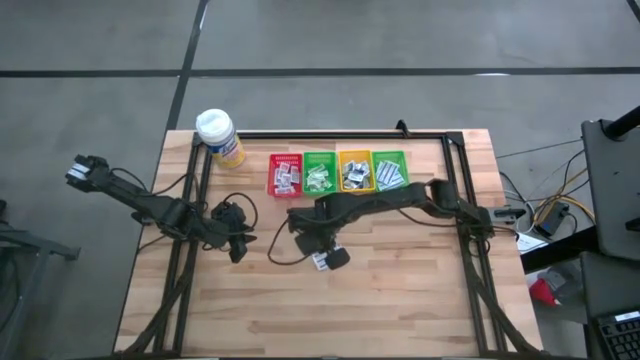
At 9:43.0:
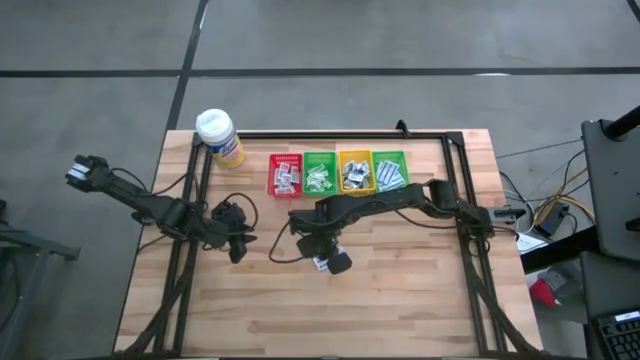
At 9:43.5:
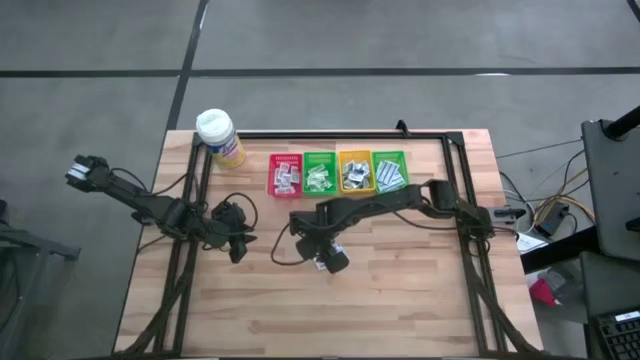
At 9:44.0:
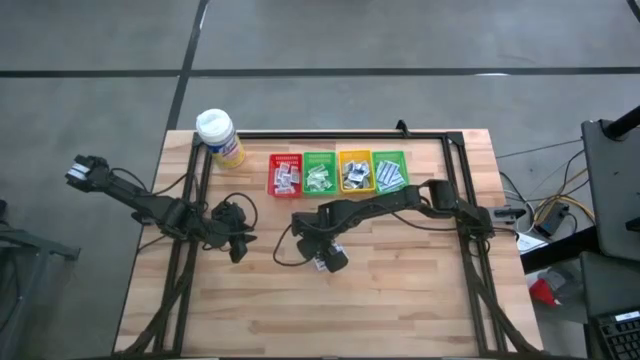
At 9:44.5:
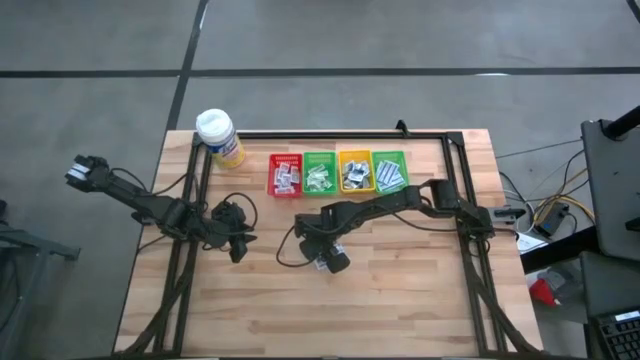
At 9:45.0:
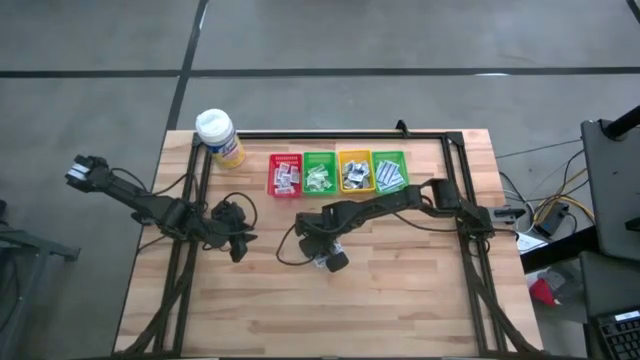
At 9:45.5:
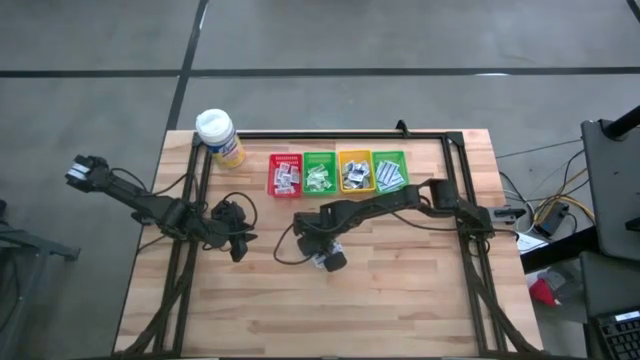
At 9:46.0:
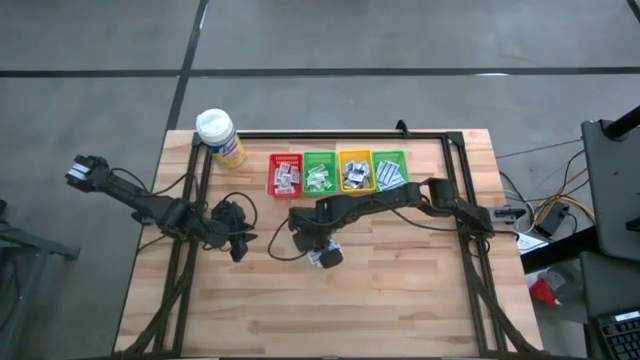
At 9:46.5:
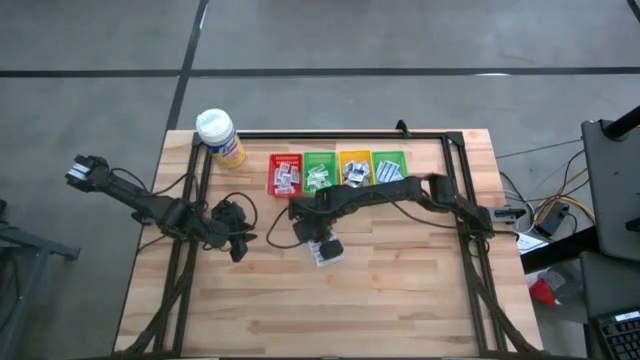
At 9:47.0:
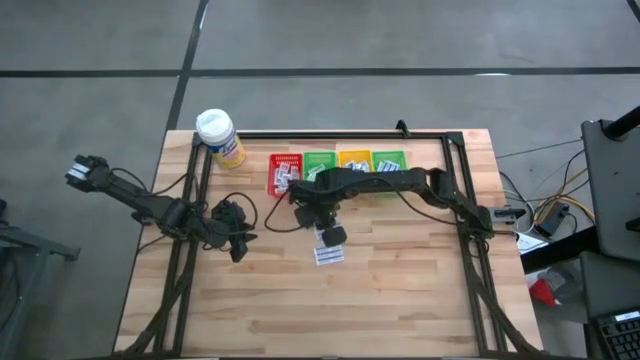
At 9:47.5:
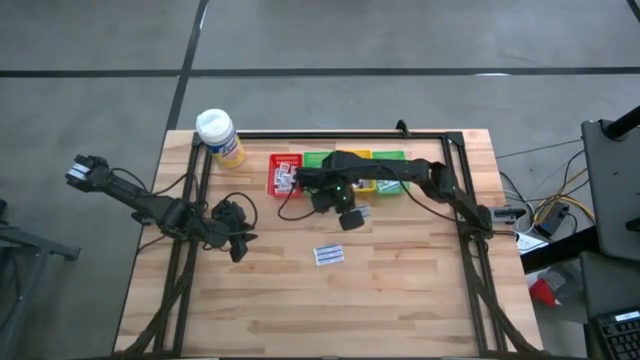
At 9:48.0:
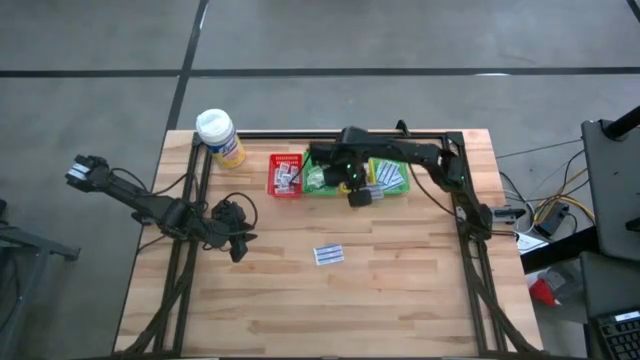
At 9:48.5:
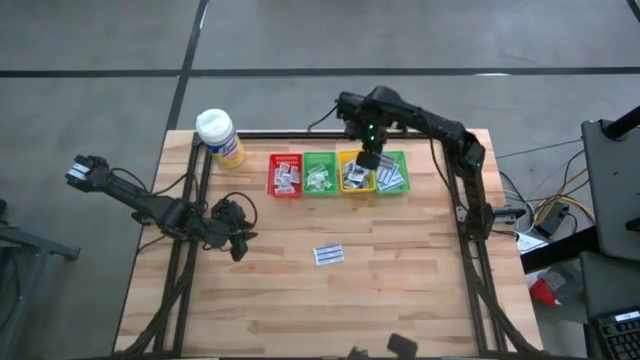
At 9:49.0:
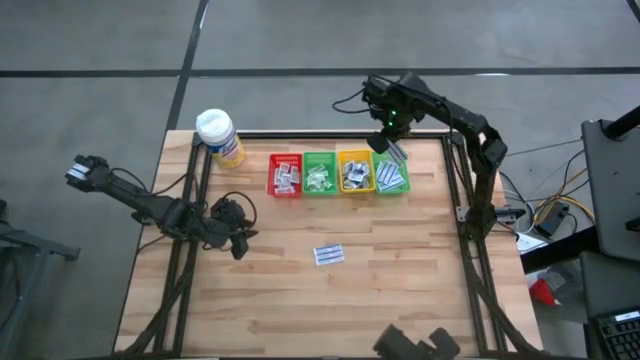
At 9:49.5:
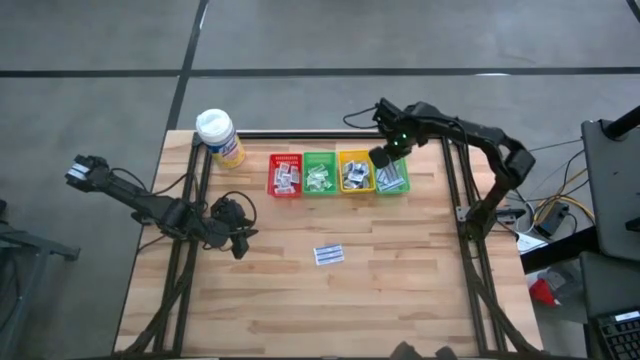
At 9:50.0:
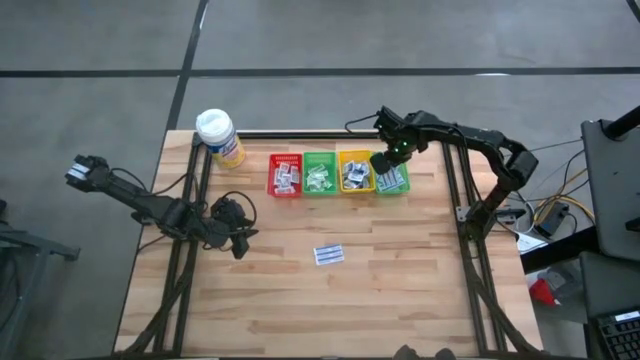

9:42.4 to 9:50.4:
Task: Pick & Place First Aid Supplies
Put the blue fingertip bandage into the right green bin

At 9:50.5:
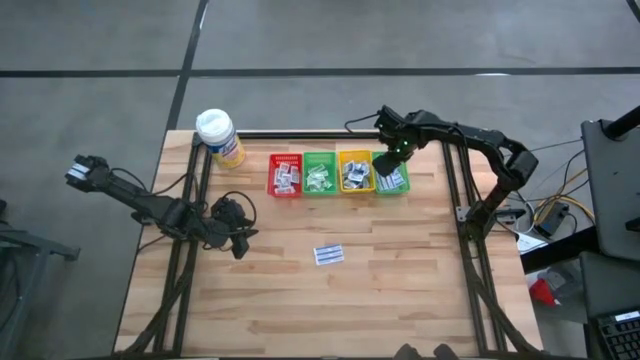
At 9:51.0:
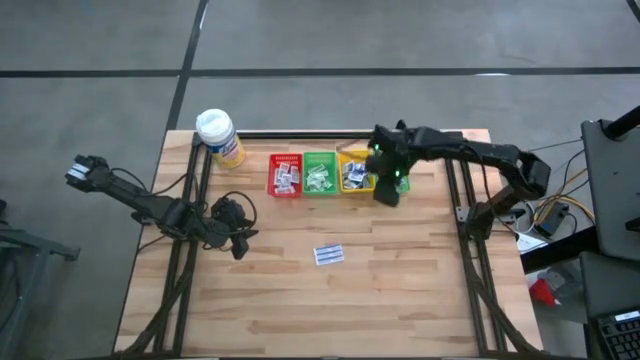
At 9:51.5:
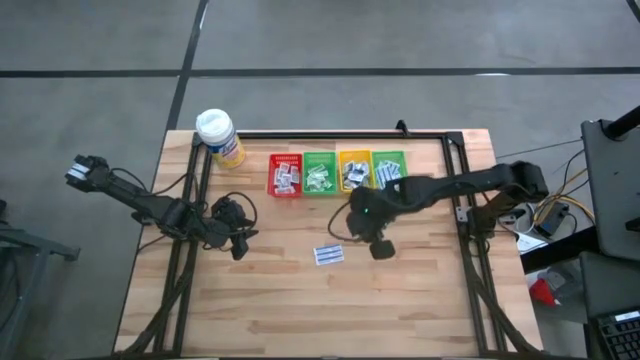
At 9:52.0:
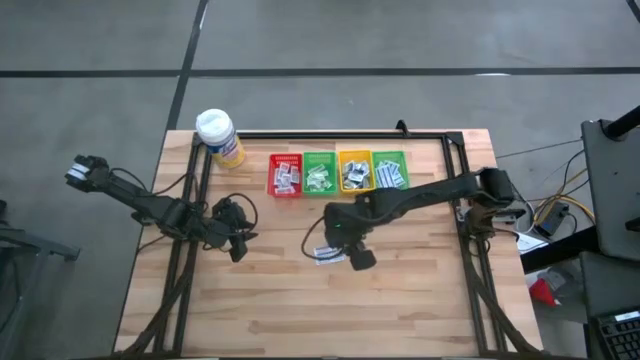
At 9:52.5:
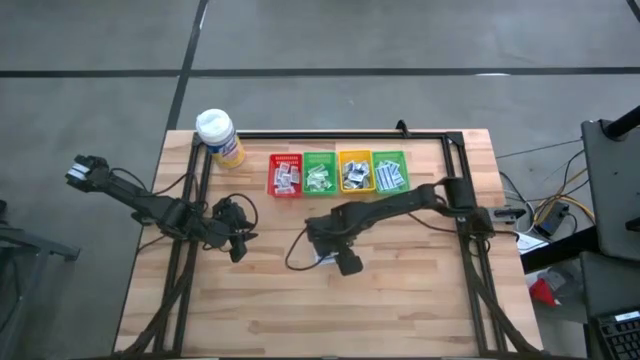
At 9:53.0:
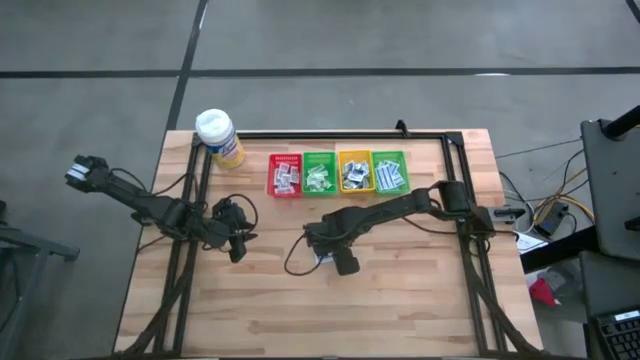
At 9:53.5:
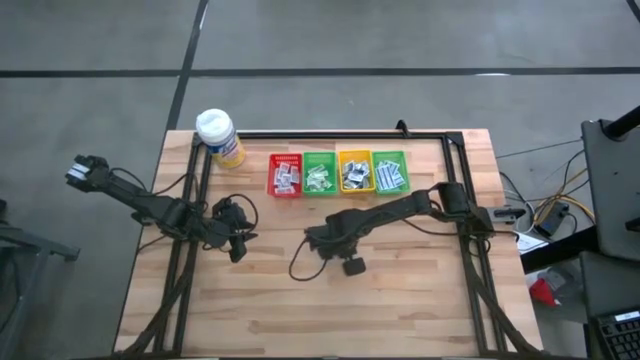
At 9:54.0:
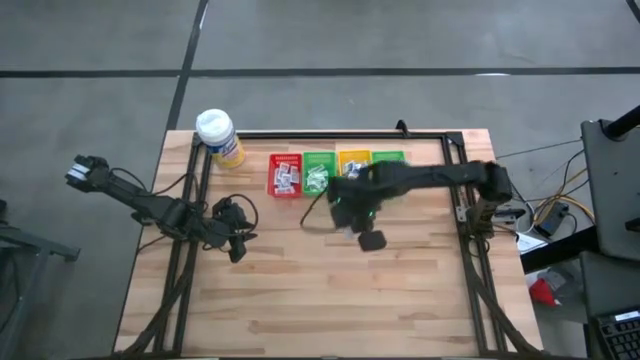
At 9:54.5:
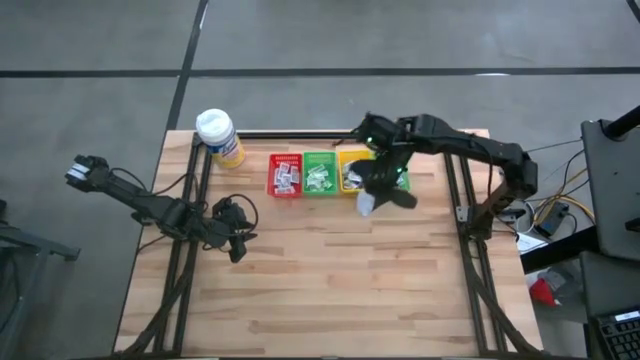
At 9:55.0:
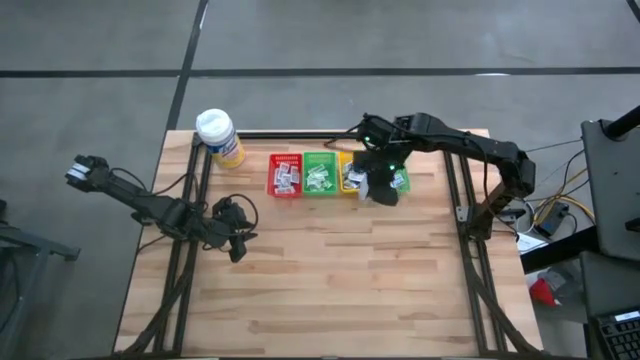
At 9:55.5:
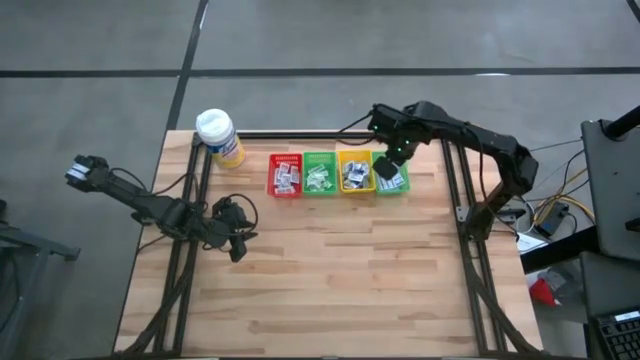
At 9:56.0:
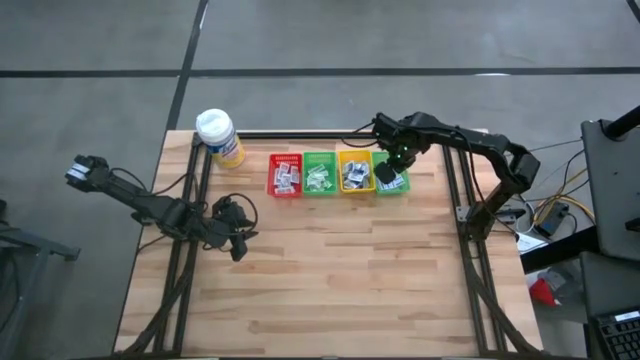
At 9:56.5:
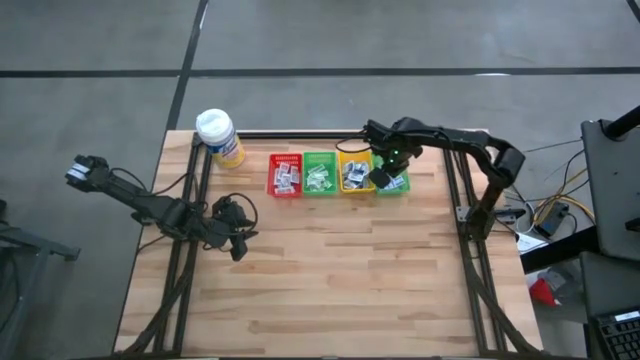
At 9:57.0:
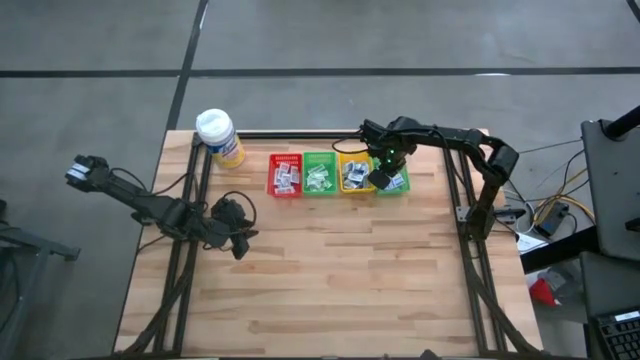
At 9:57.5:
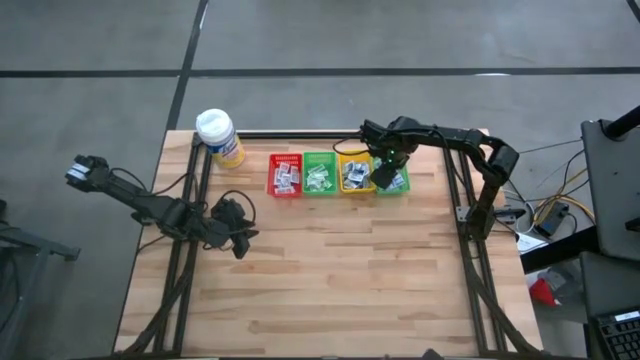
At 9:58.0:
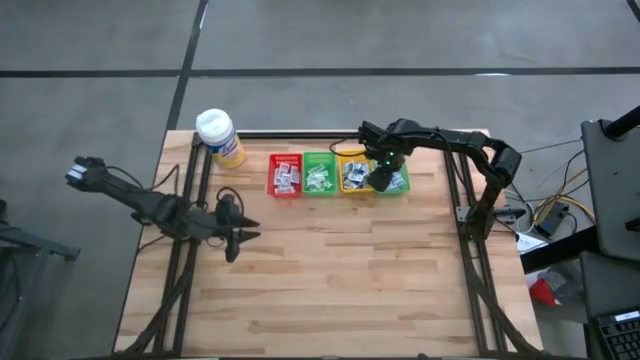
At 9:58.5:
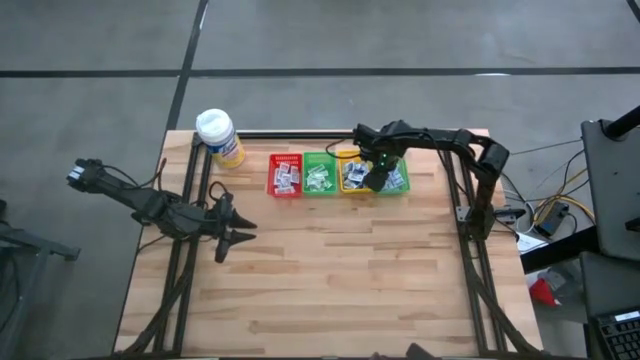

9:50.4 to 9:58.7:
Put the blue fingertip bandage into the right green bin

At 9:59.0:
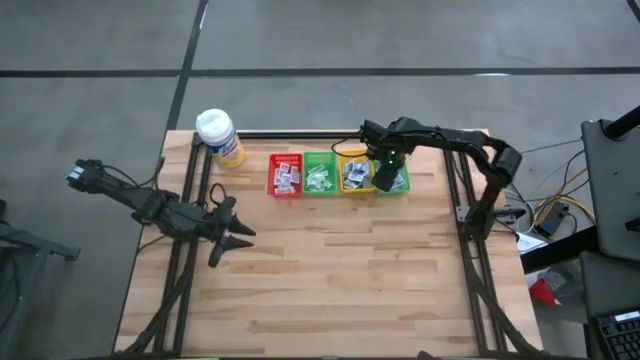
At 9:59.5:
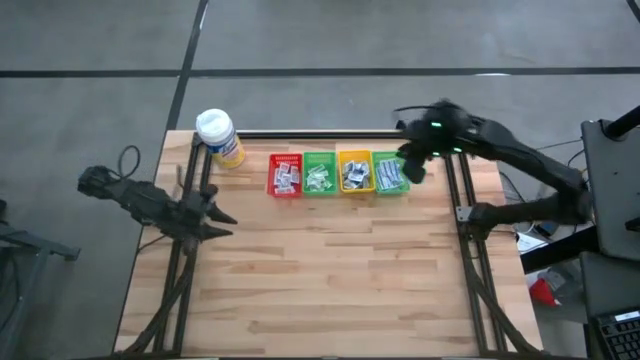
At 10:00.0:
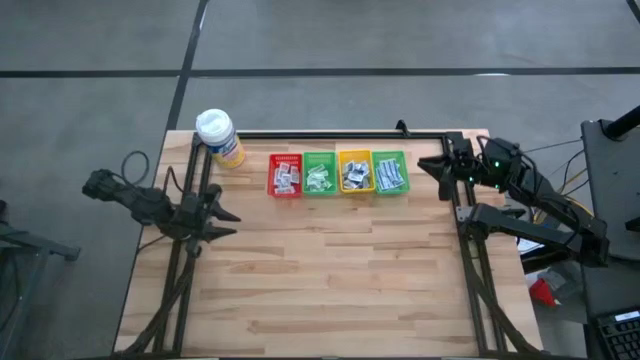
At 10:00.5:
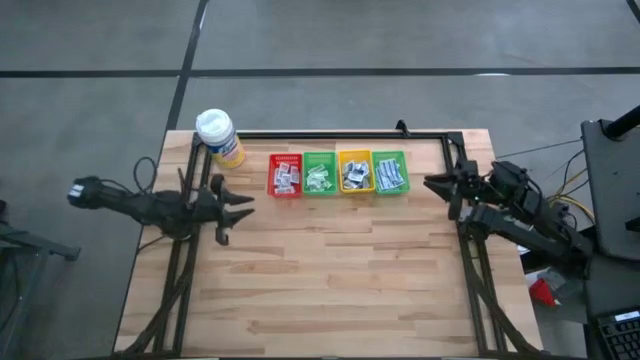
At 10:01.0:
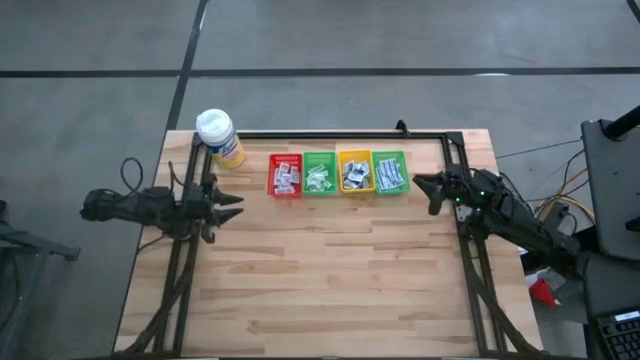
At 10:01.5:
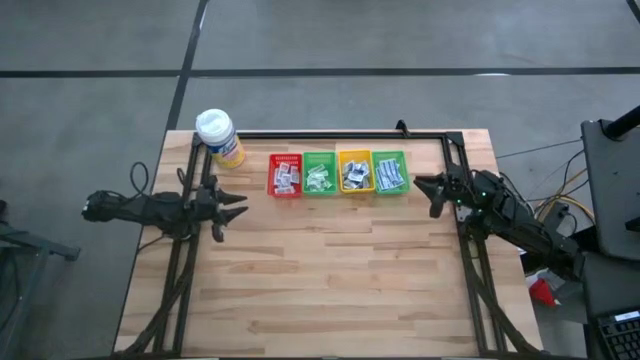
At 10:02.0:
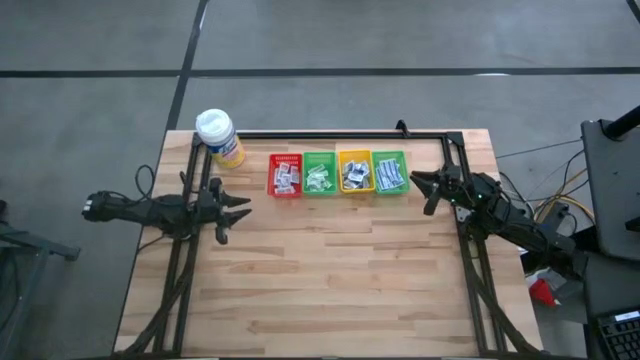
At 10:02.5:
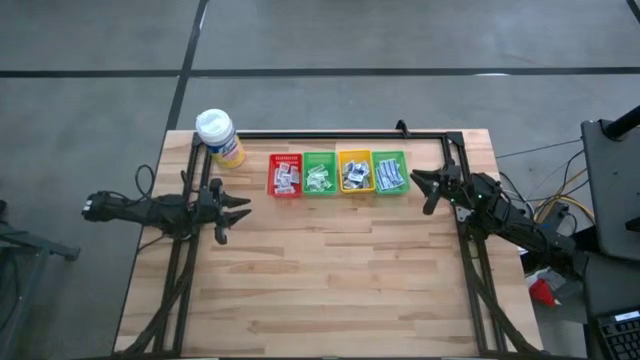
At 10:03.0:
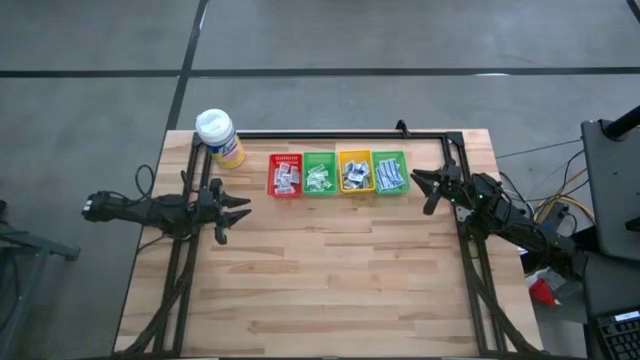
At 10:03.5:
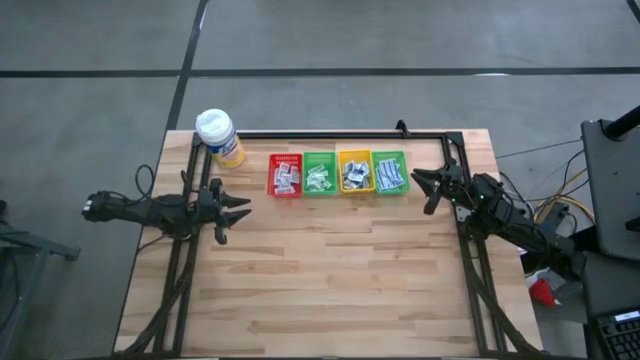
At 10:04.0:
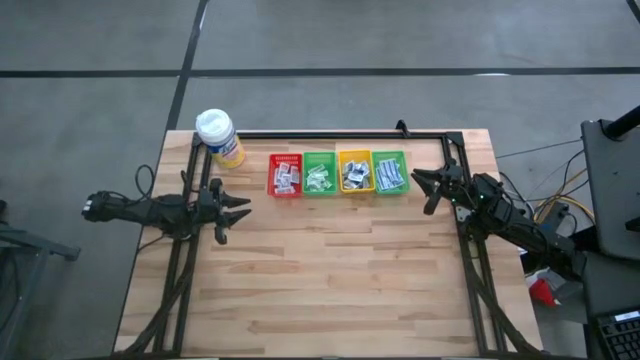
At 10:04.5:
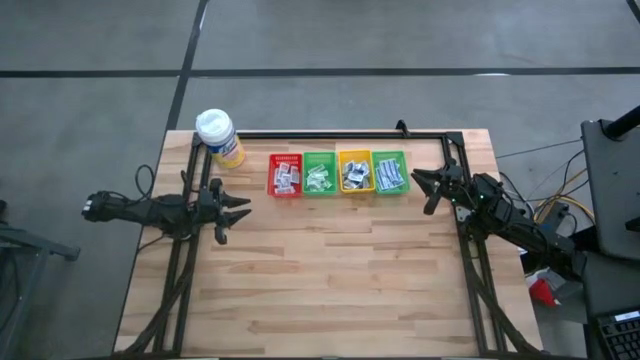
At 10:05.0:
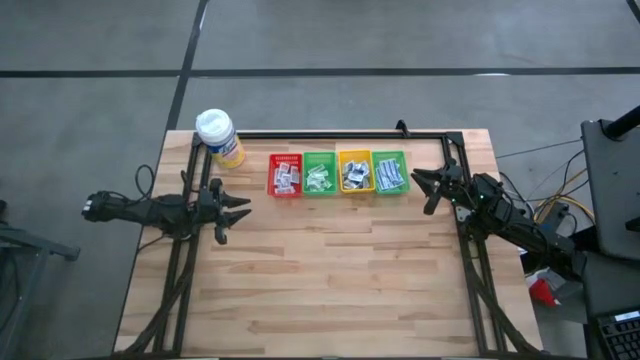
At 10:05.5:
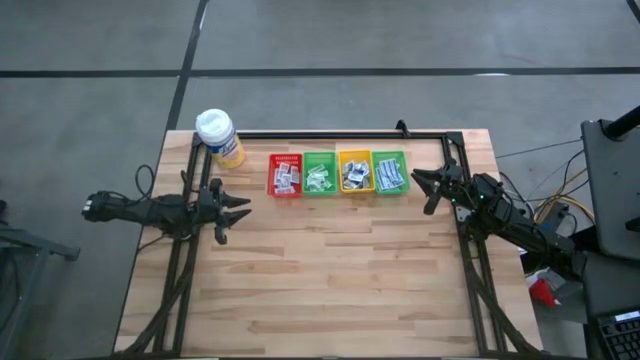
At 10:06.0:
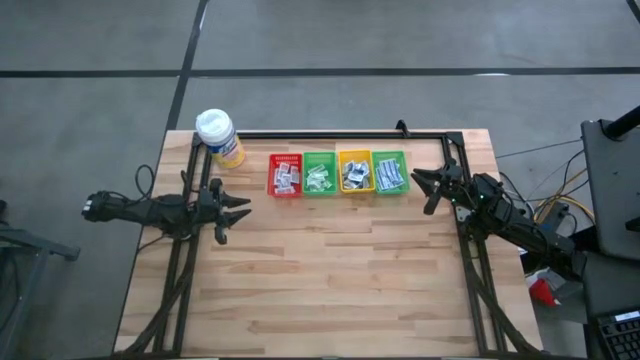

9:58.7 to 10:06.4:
Return to Home Position
